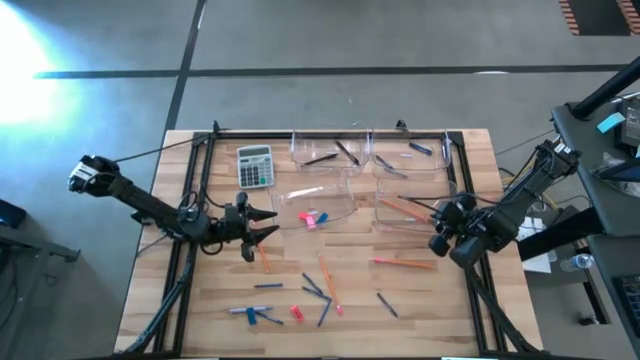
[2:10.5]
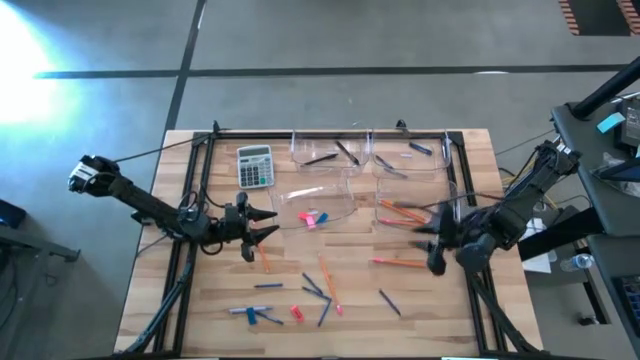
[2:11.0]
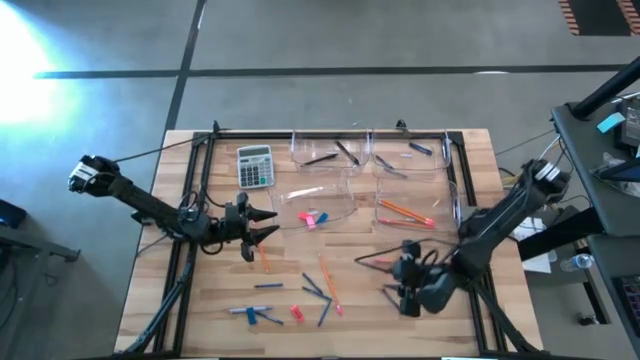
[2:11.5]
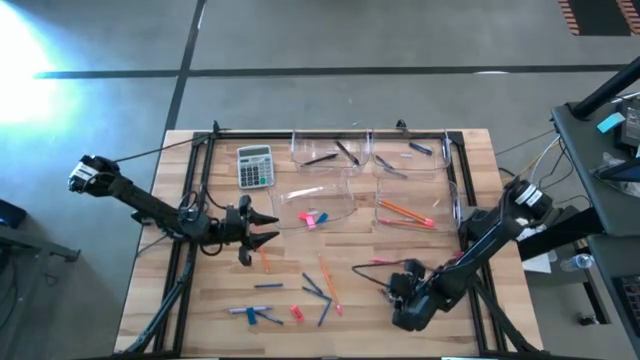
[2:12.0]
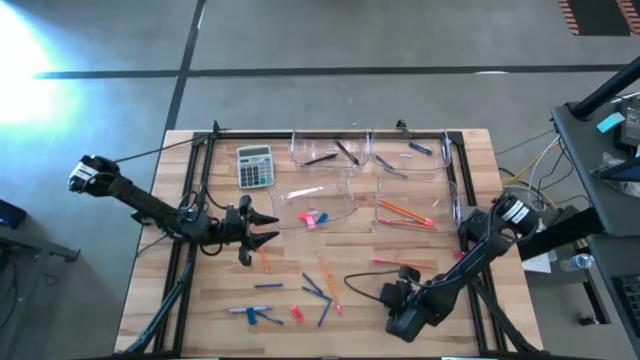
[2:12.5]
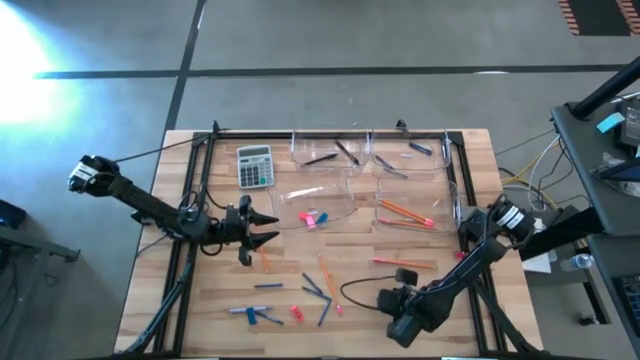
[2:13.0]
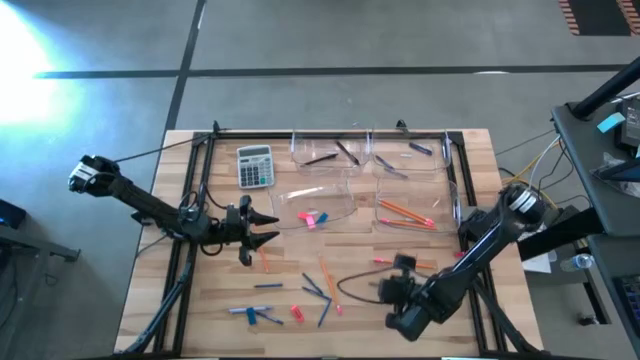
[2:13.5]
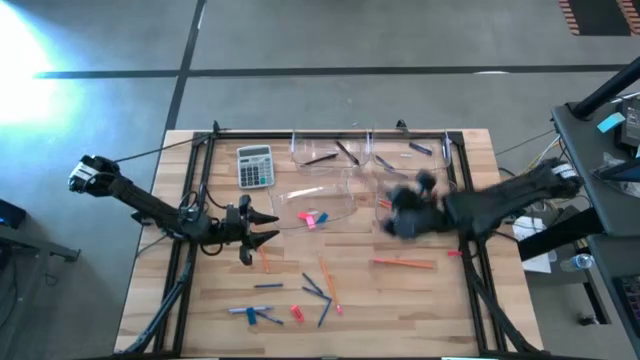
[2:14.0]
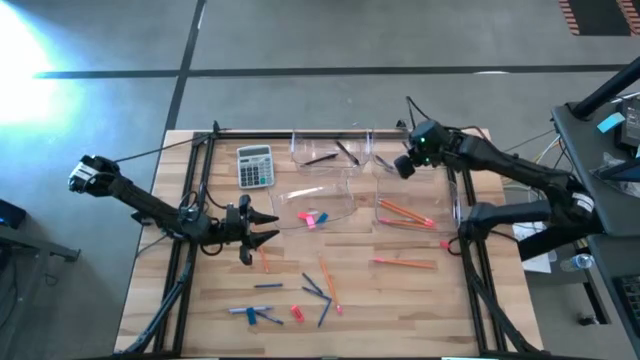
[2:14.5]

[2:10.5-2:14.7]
Task: Sort crayons/erasers/pens/pencils in bins
Put the blue crayon into the top right transparent bin

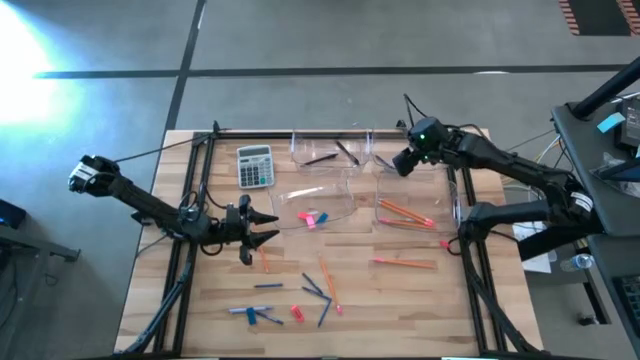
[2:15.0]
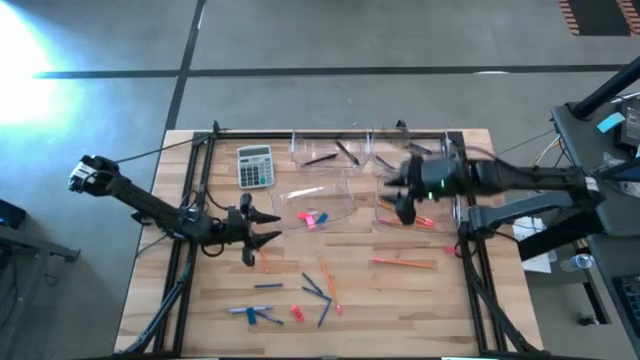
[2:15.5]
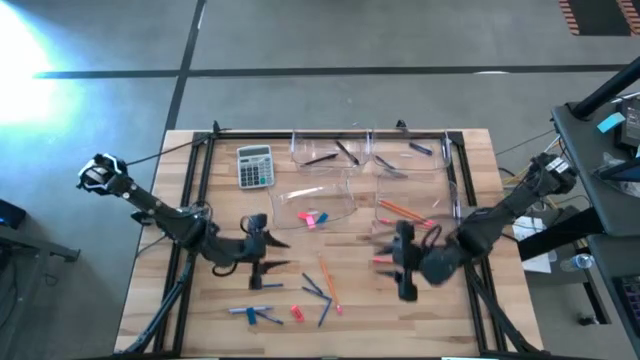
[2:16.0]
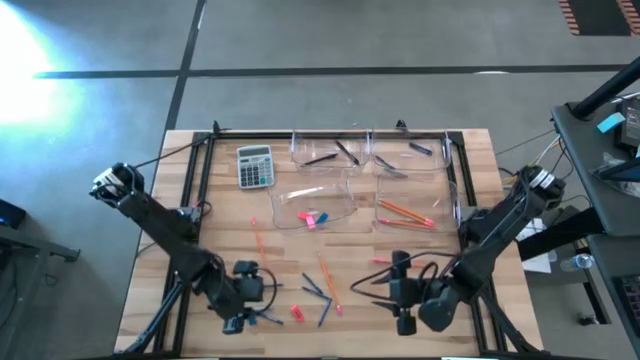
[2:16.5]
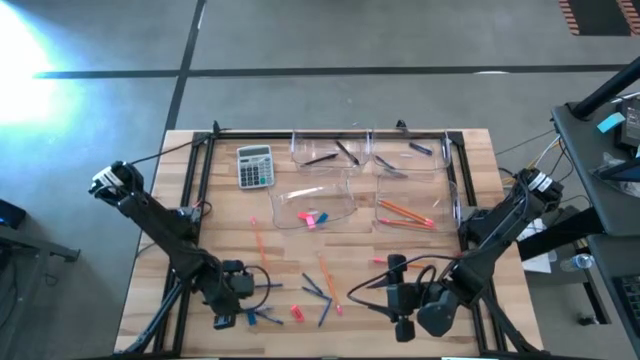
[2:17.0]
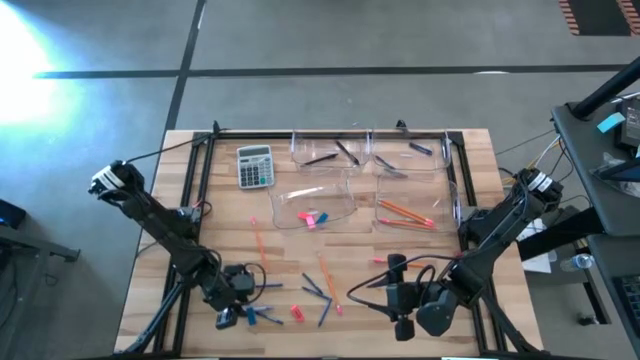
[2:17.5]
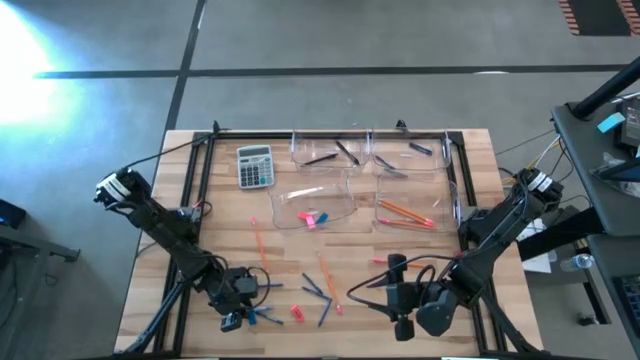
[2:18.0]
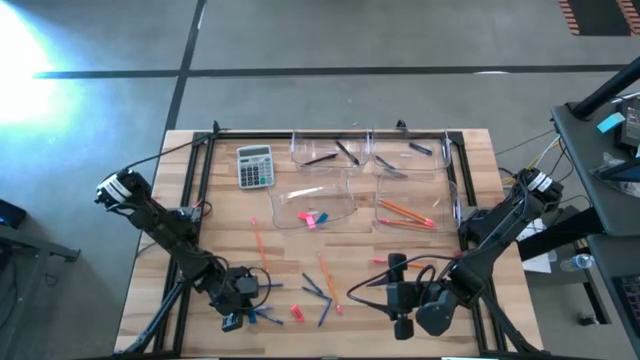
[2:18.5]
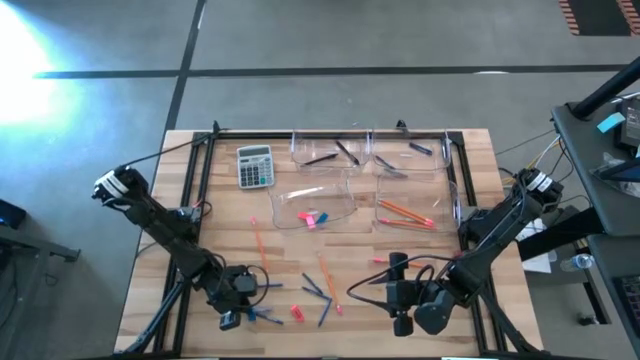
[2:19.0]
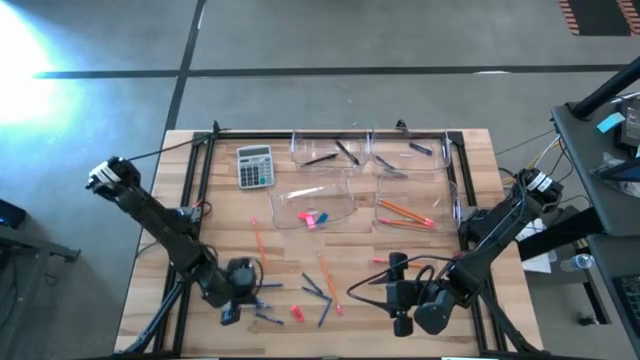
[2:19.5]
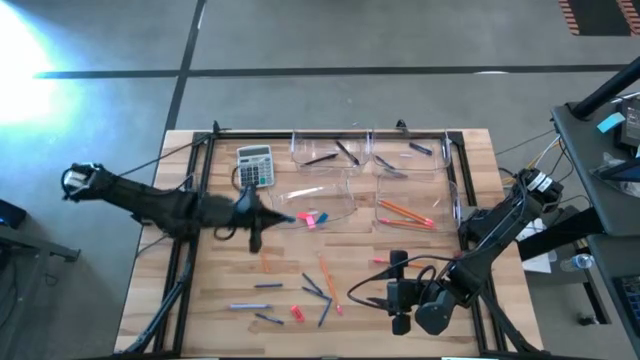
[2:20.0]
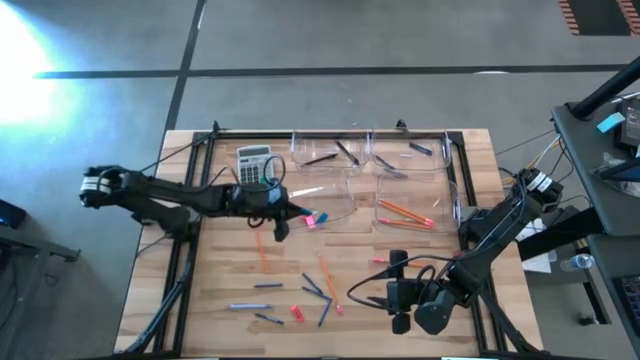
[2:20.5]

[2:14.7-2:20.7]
Put the blue eraser into the bottom left transparent bin

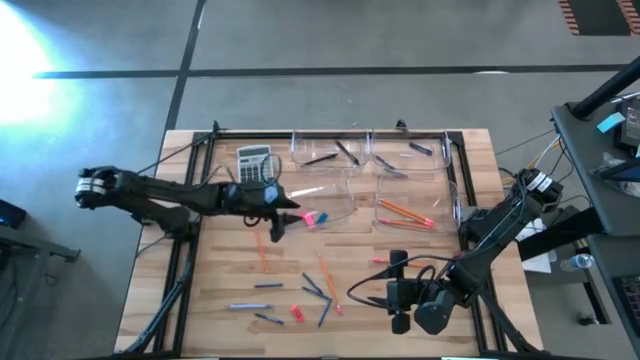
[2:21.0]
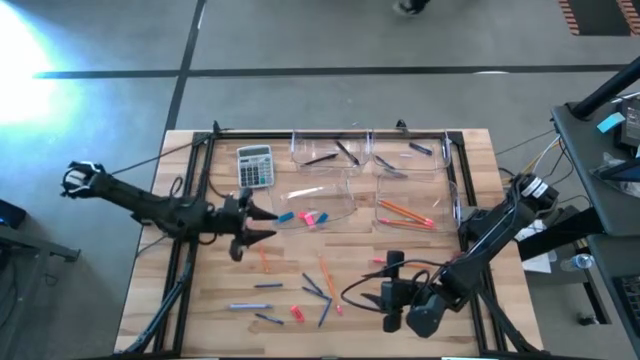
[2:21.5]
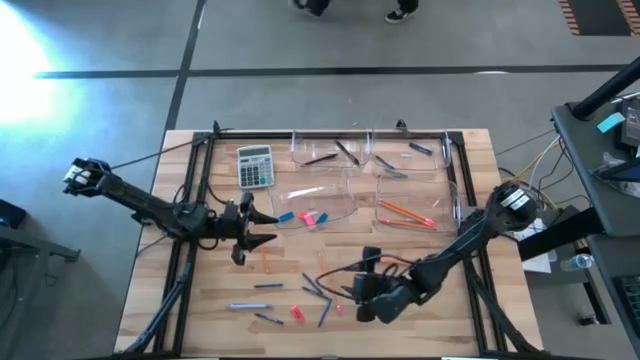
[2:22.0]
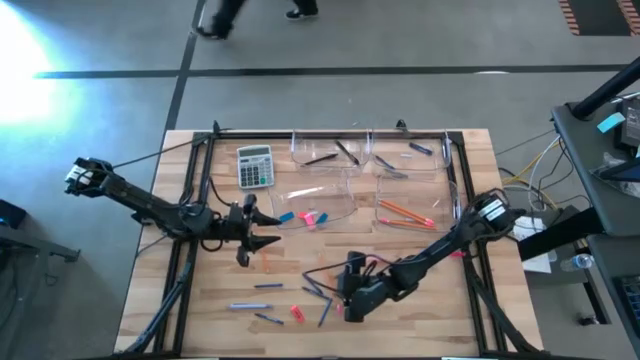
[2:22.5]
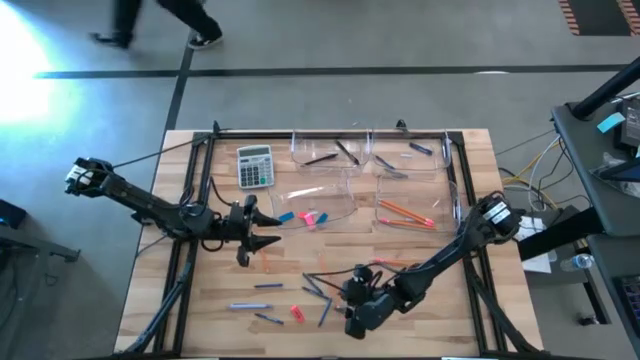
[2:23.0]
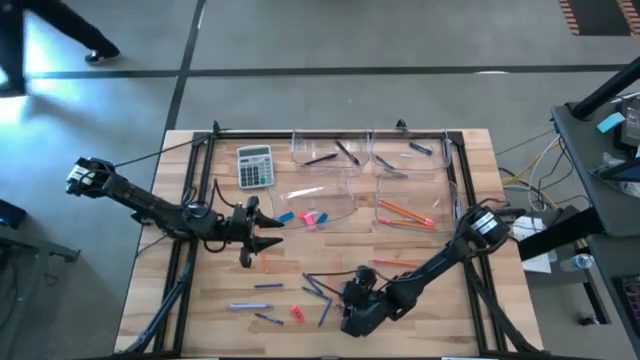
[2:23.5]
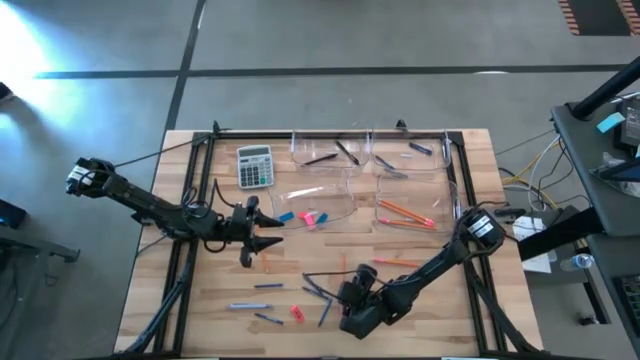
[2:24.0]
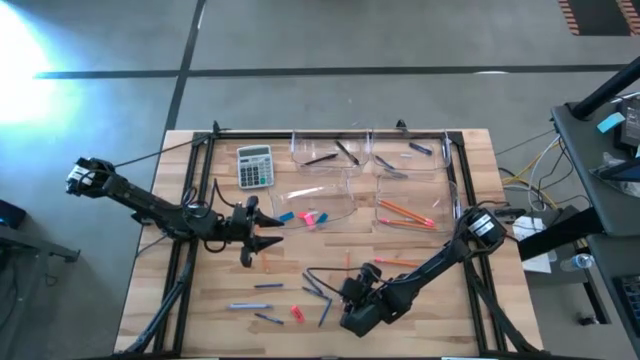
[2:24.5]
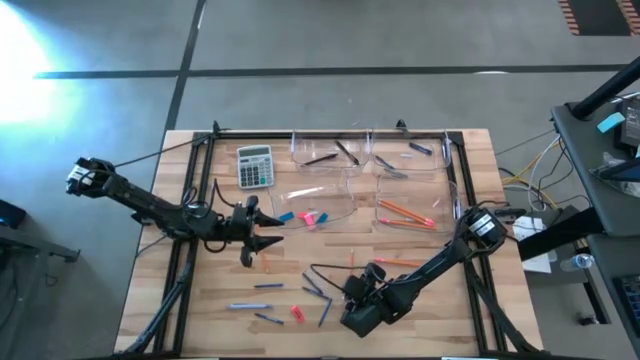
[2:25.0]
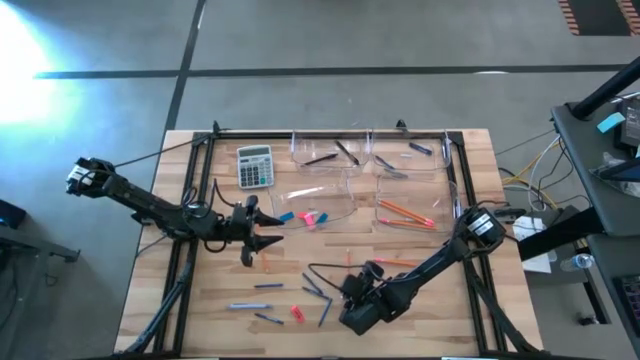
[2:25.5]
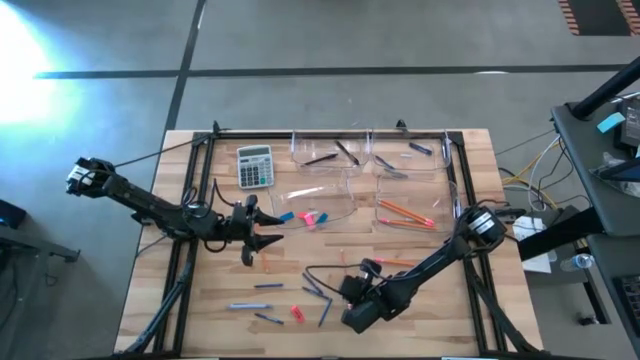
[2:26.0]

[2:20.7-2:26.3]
Put the orange pencil into the bottom right transparent bin

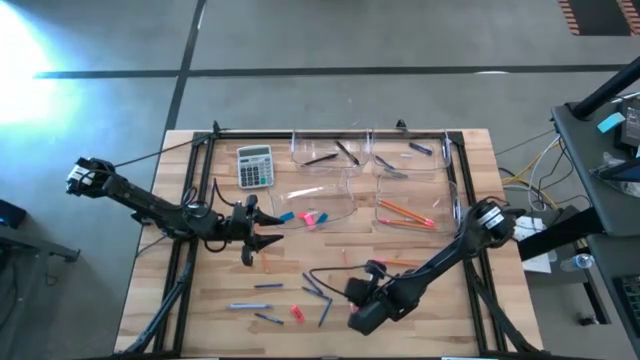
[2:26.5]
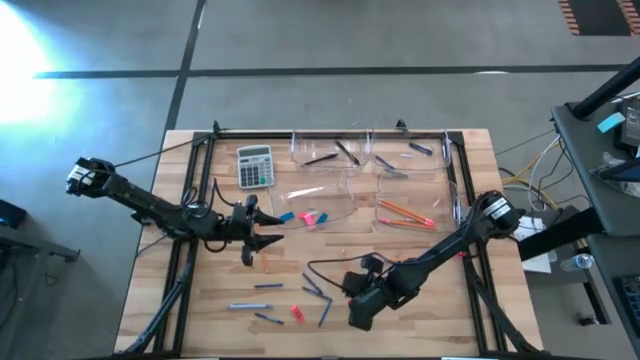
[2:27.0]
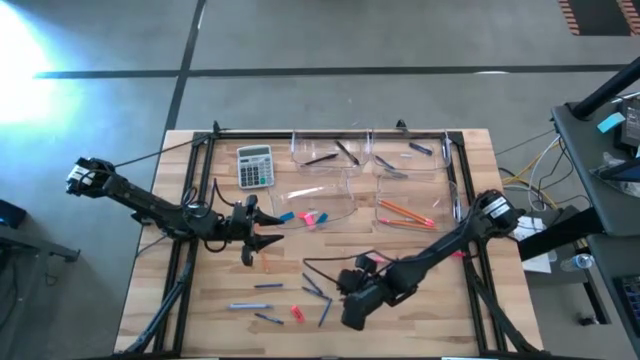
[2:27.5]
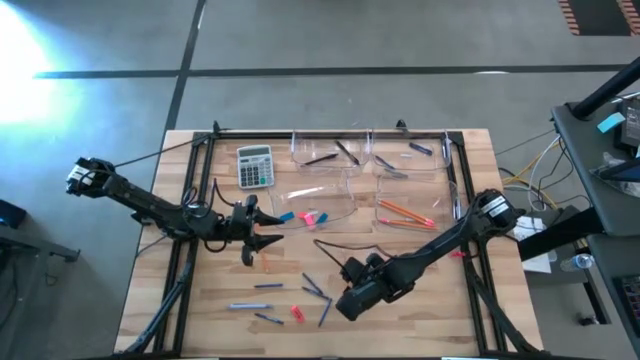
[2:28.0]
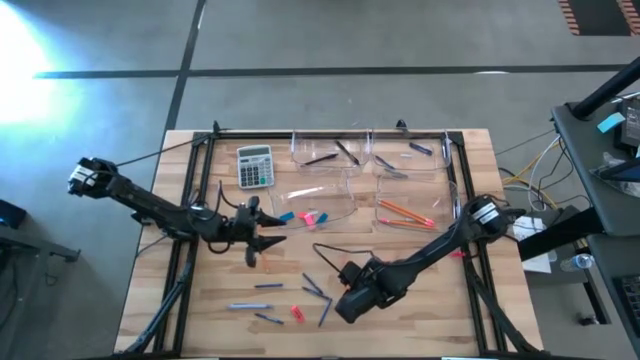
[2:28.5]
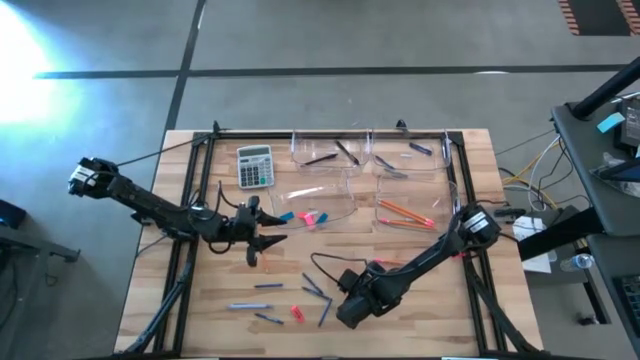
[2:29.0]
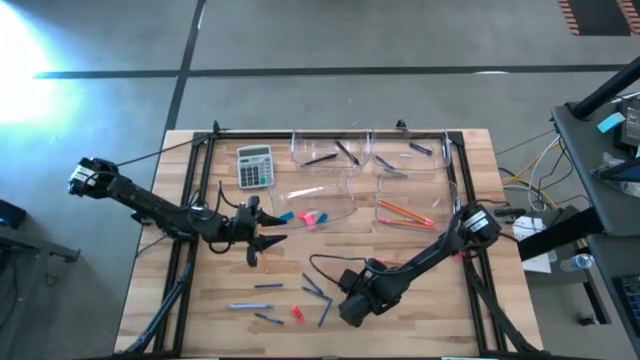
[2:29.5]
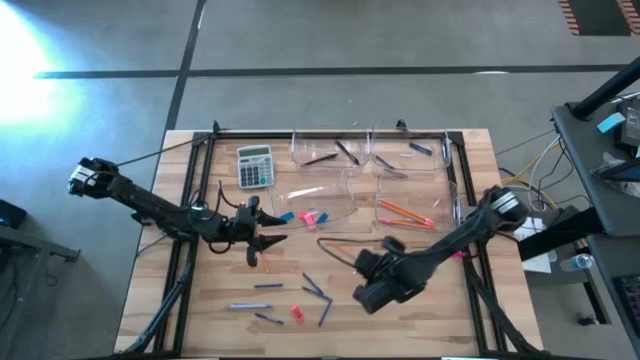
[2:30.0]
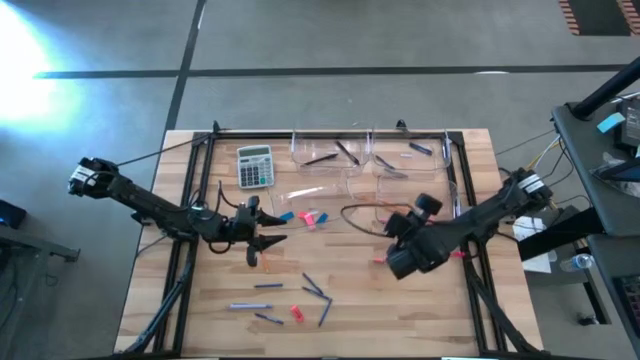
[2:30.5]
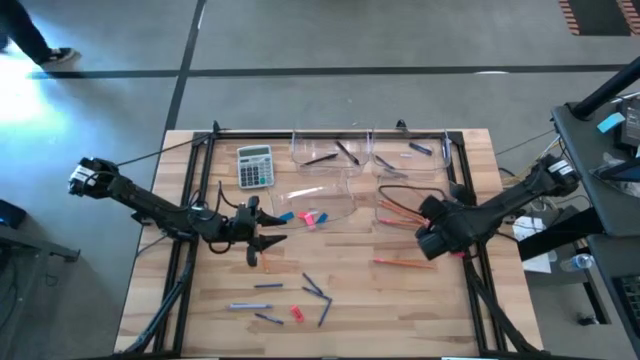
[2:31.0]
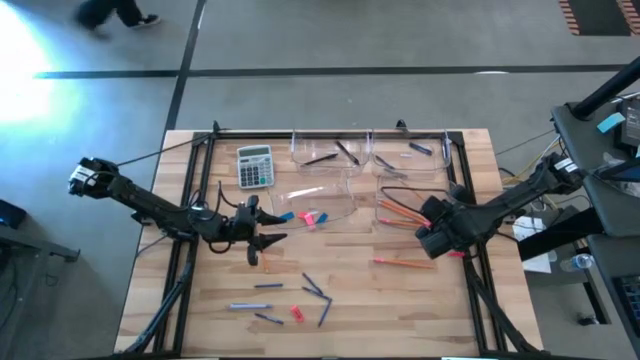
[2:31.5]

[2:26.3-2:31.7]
Put the orange pencil into the bottom right transparent bin
